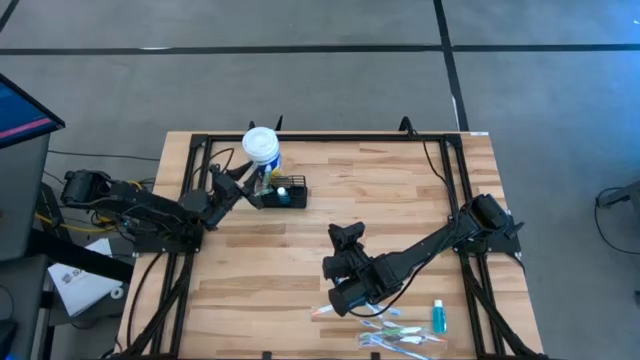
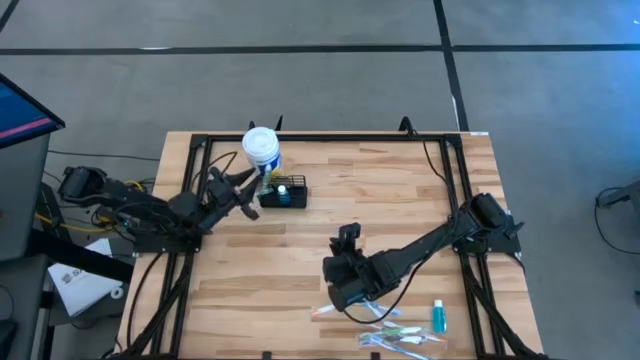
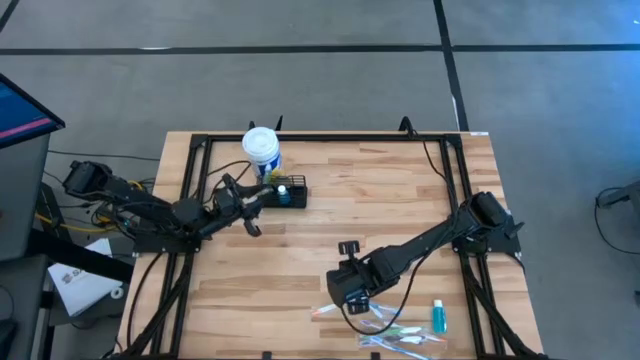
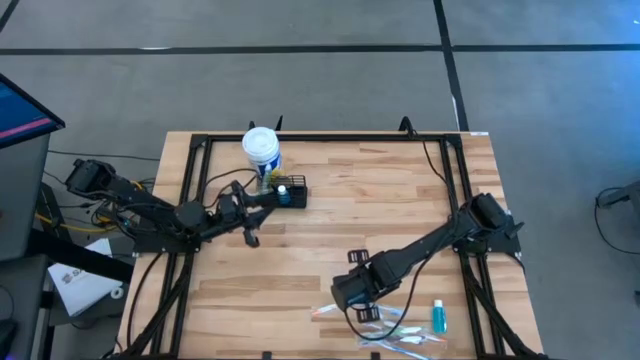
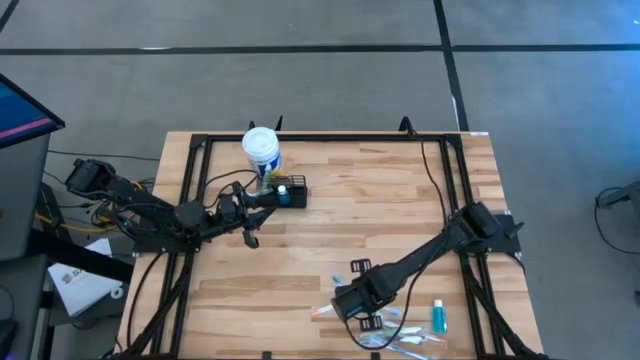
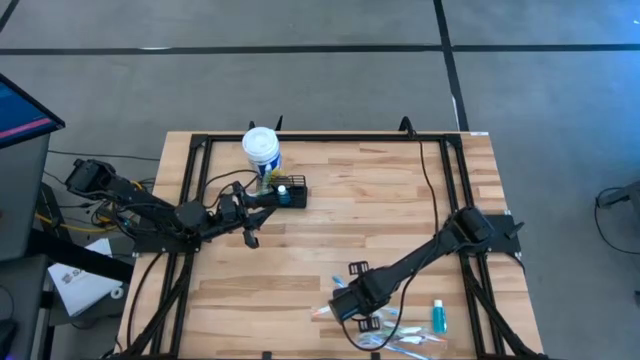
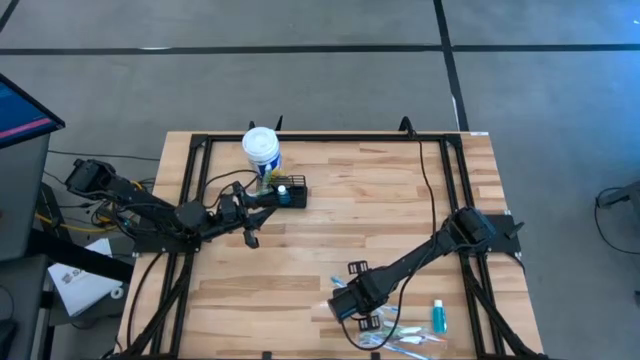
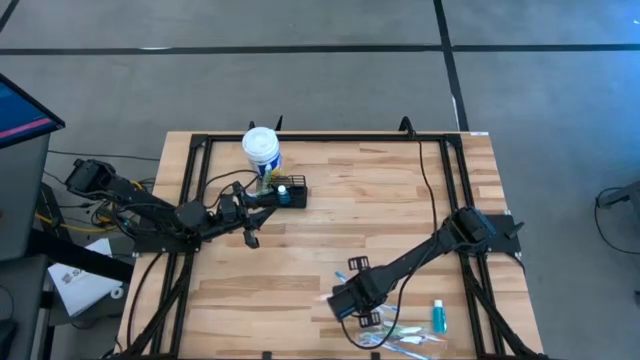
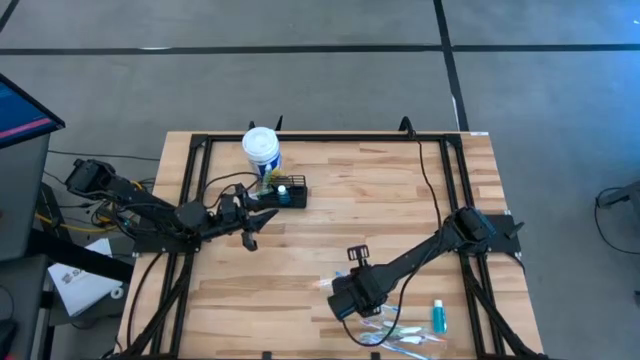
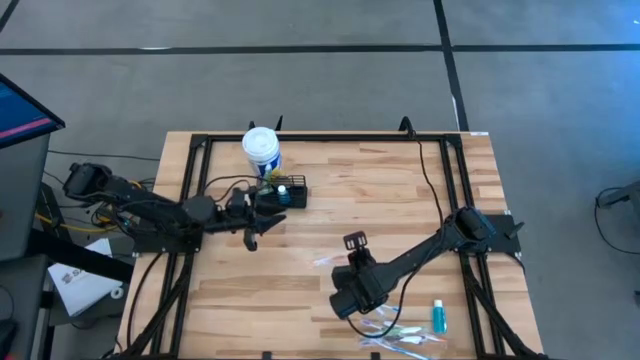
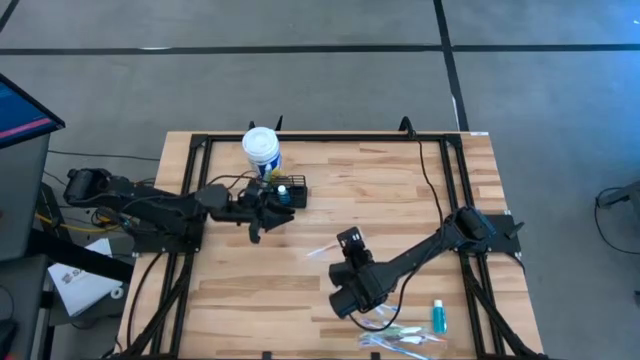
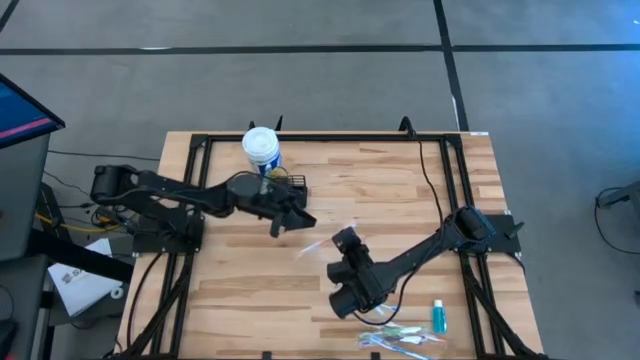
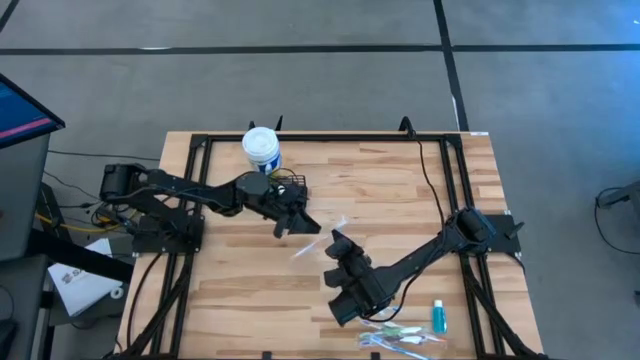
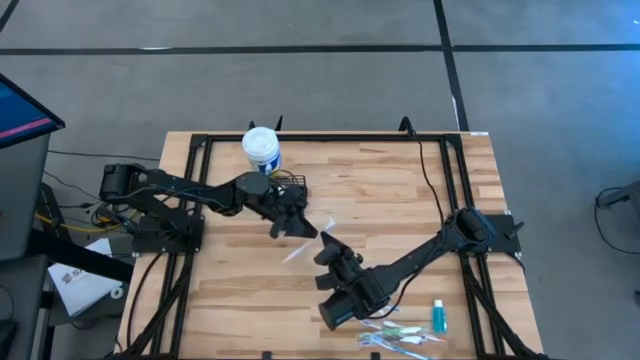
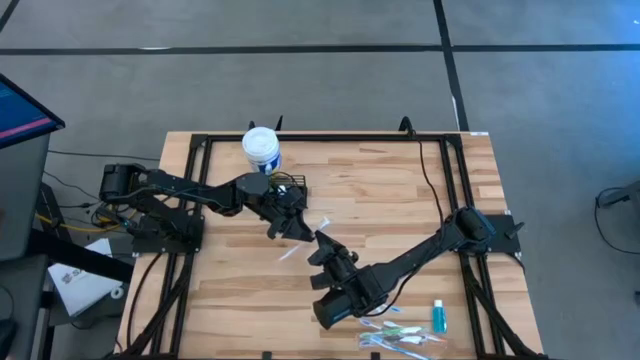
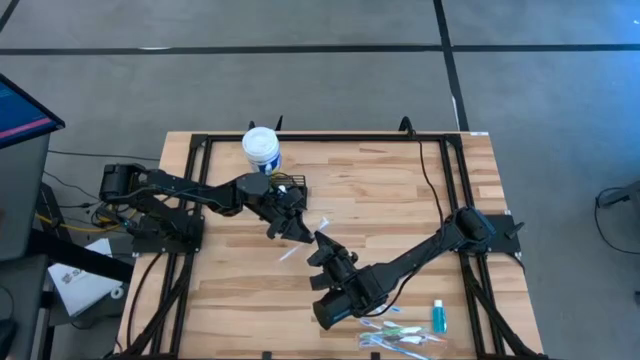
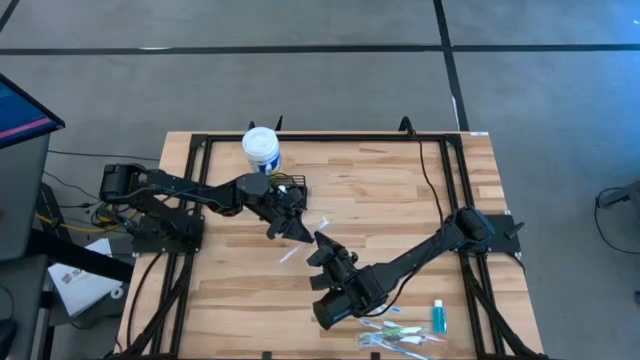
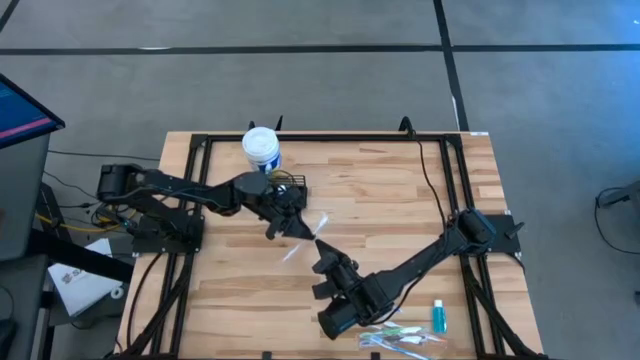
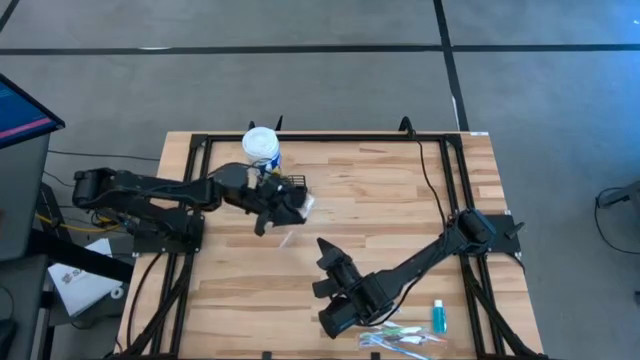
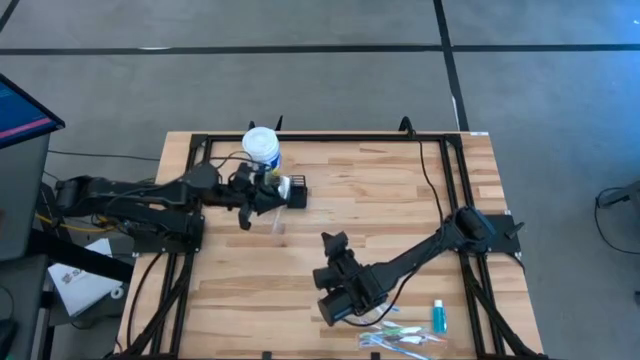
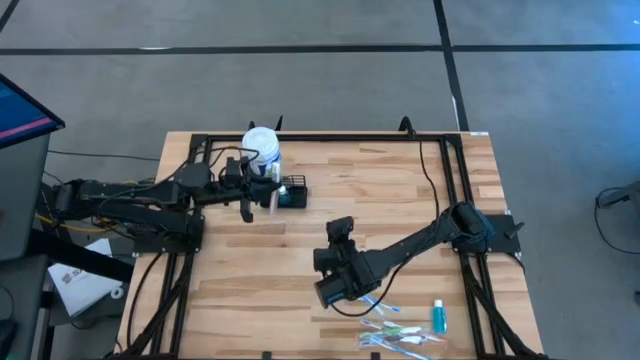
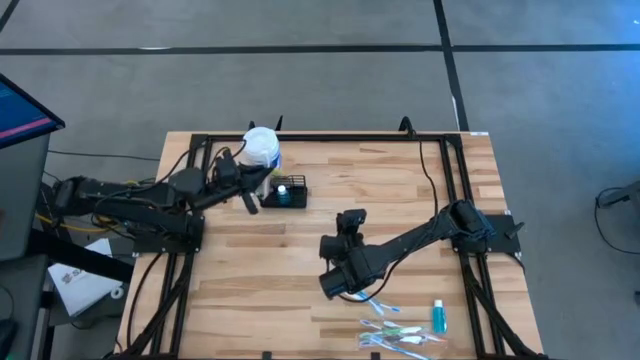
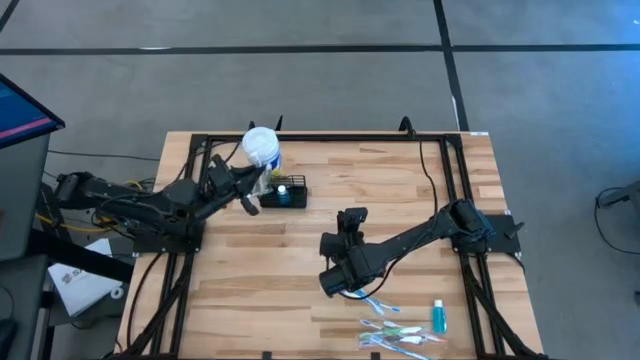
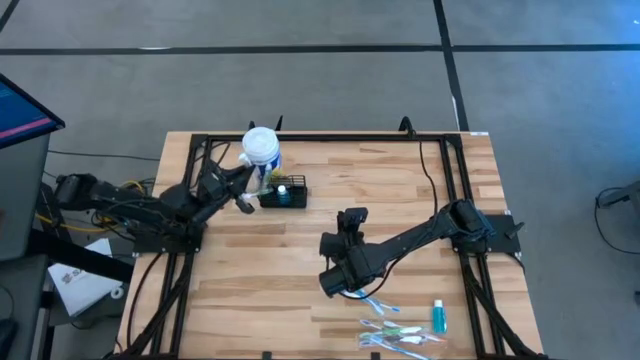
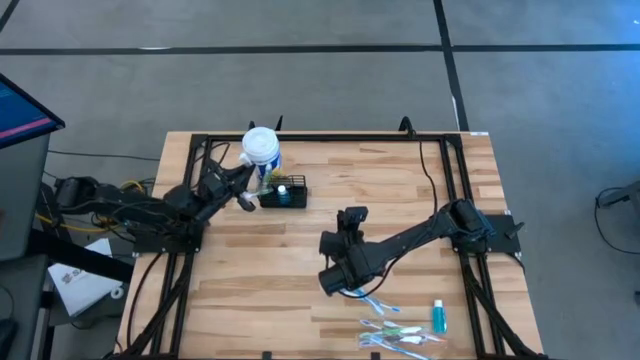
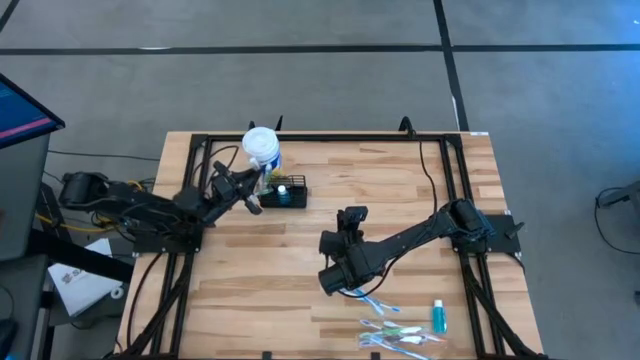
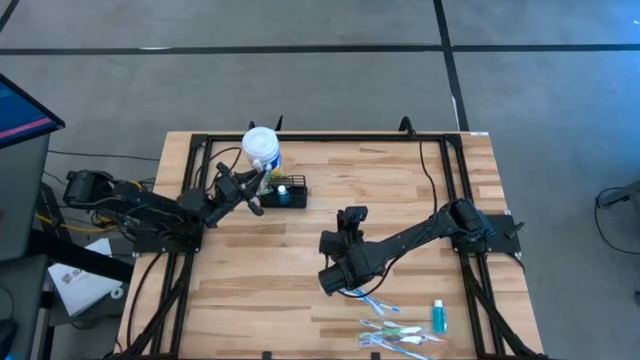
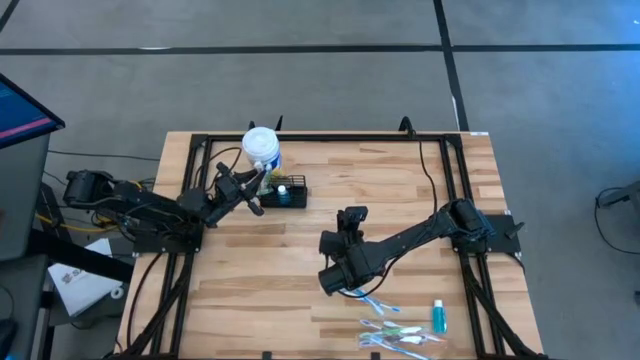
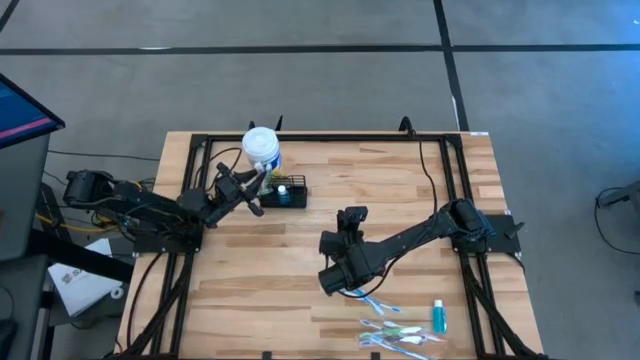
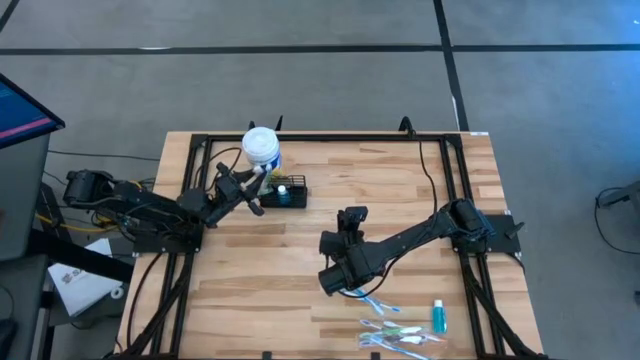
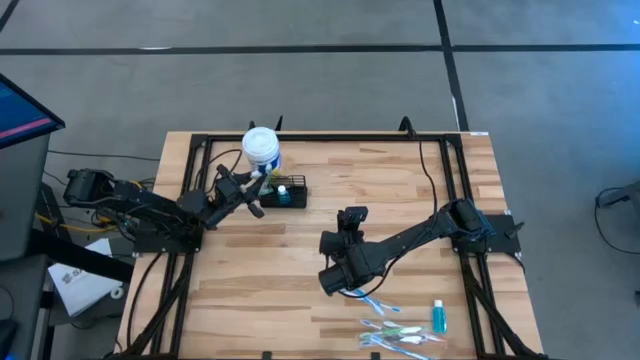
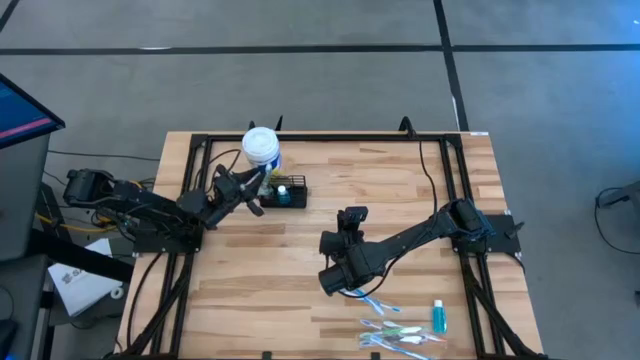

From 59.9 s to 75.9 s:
Task: Pick & Place toothbrushing station
Put the orange toothbrush into the wire organizer

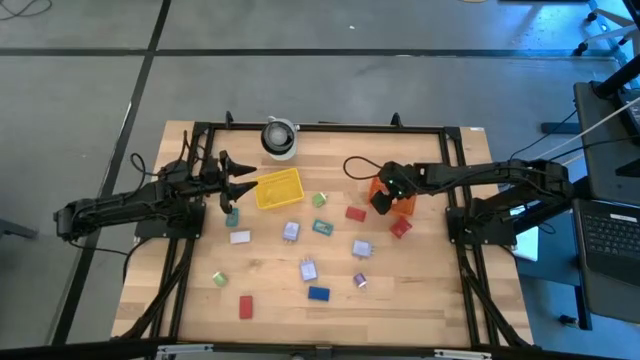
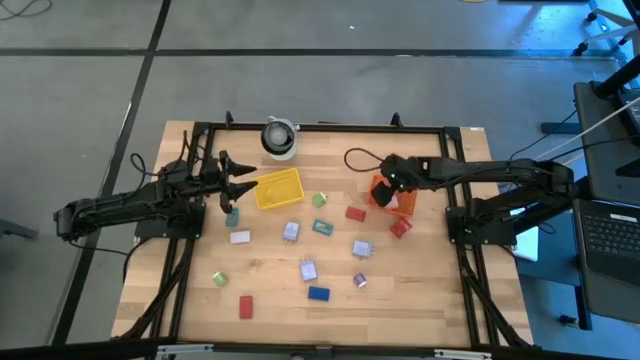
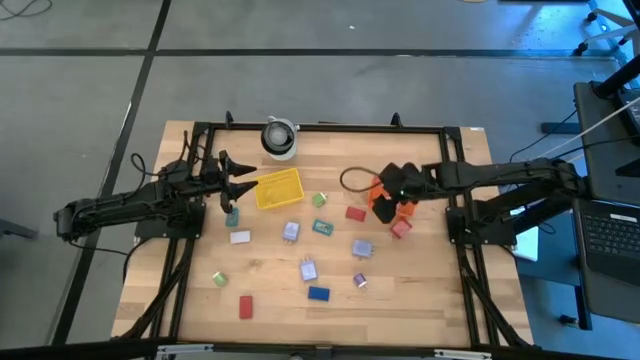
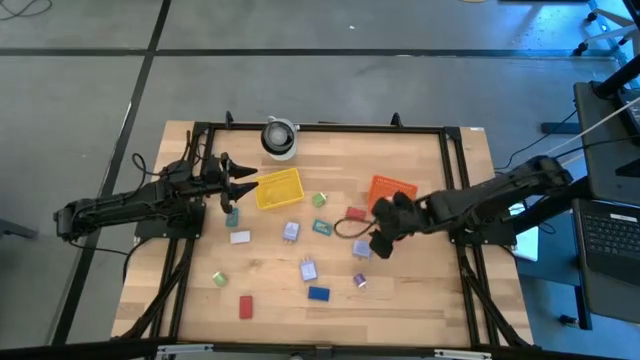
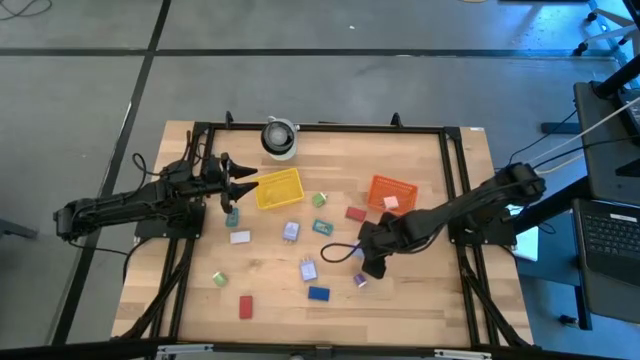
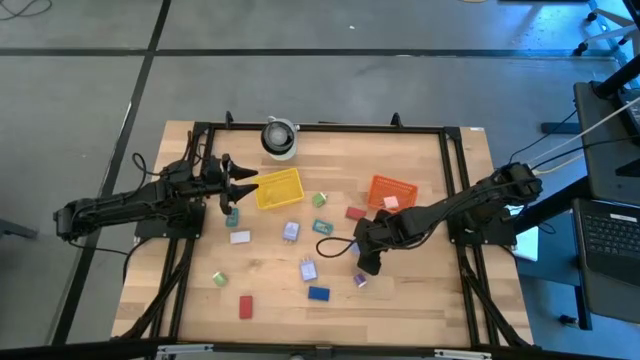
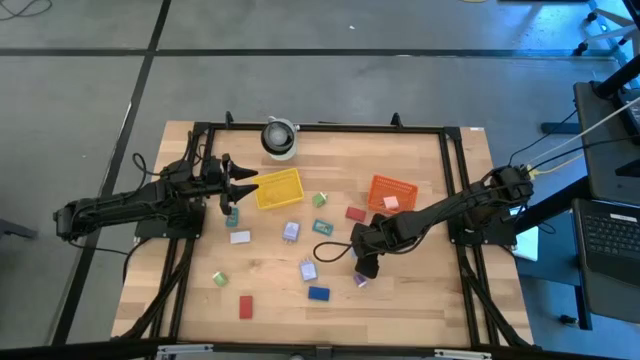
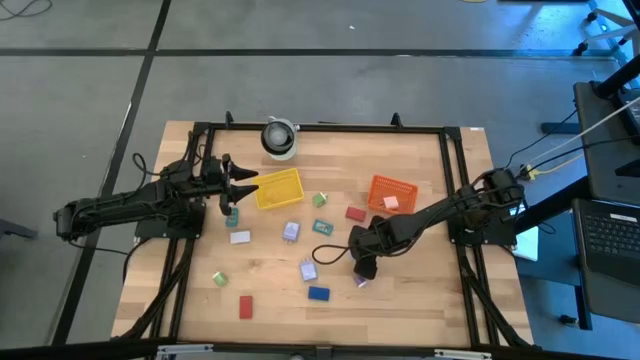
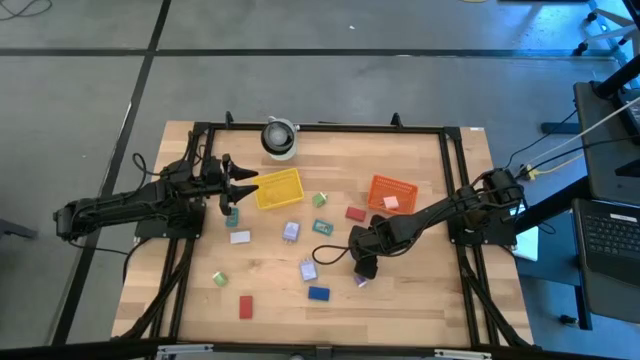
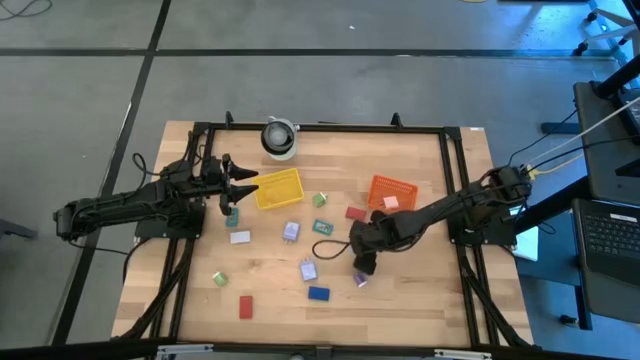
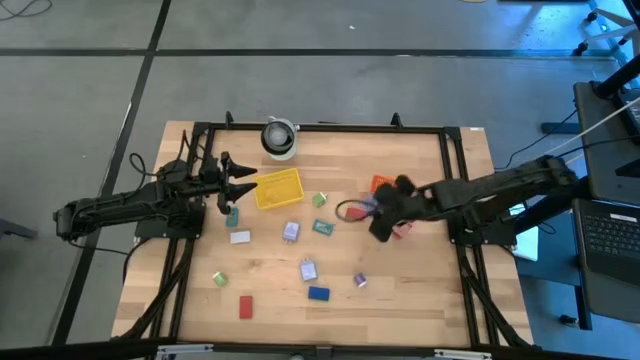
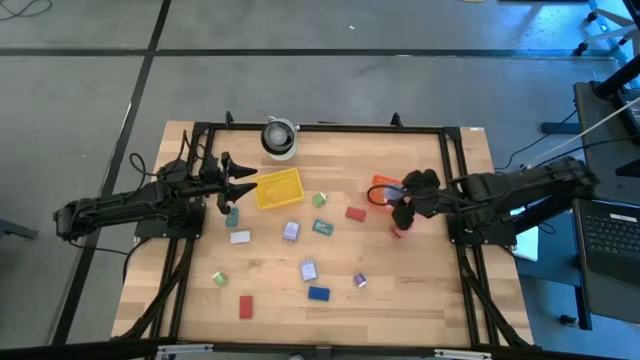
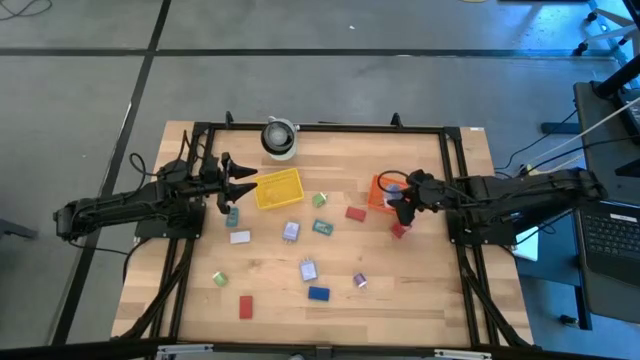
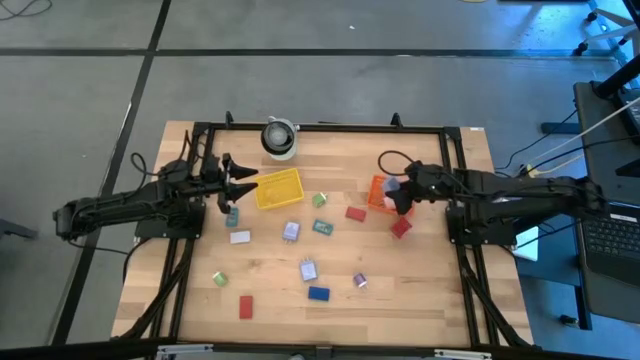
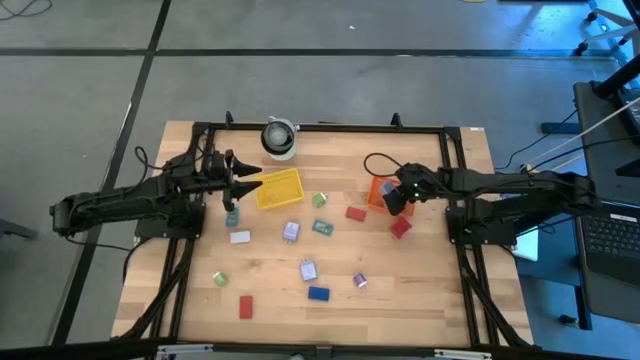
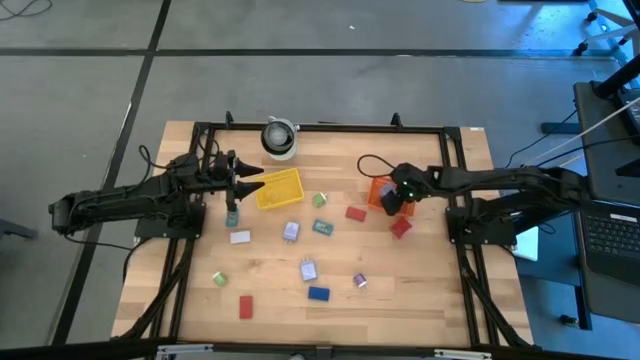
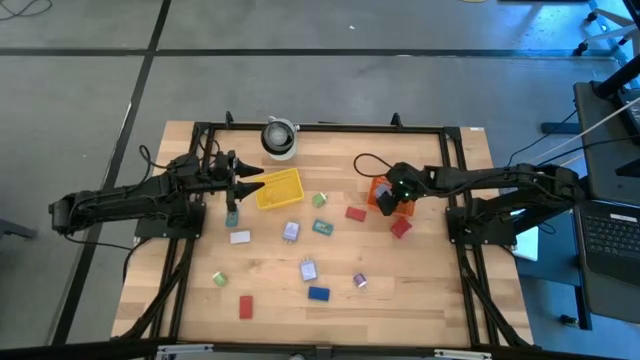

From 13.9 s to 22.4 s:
Task: Pick & Place Office items
Put the right light blue charger adapter into the orange bin
